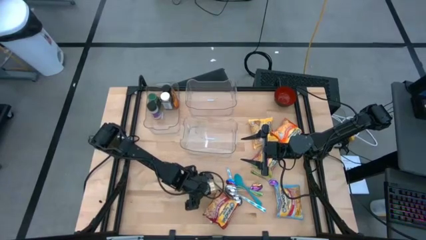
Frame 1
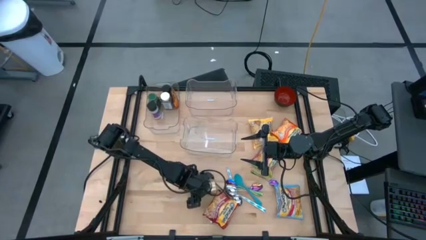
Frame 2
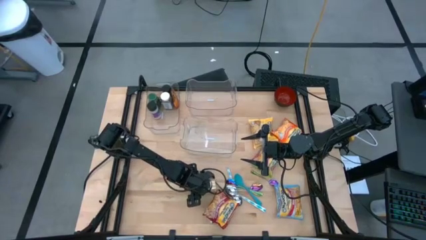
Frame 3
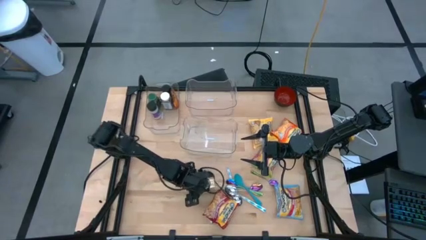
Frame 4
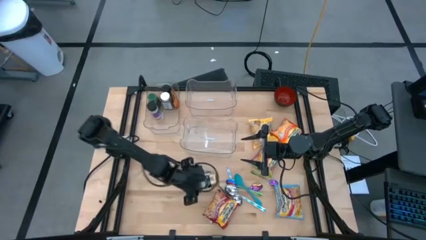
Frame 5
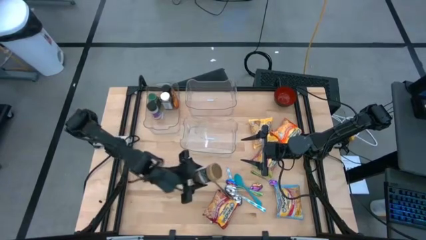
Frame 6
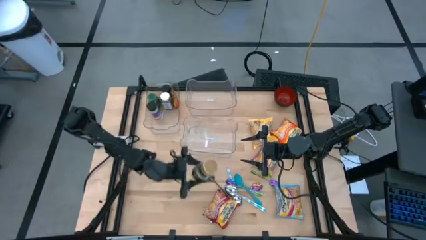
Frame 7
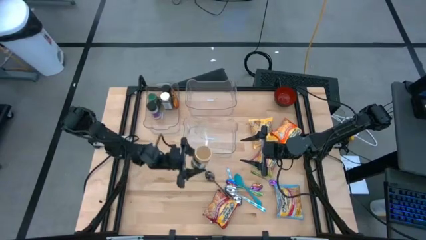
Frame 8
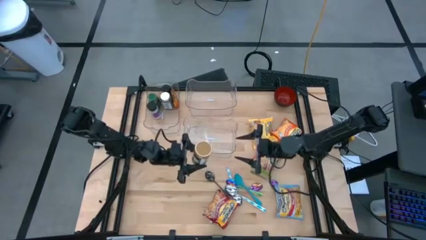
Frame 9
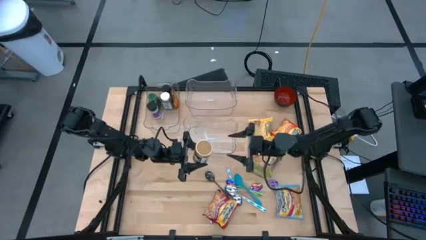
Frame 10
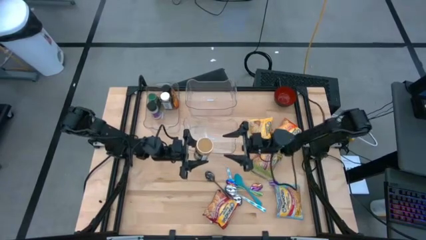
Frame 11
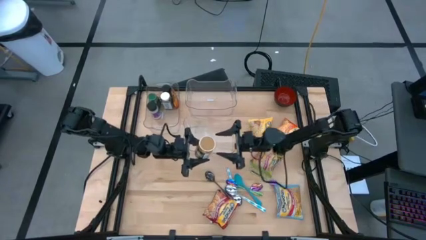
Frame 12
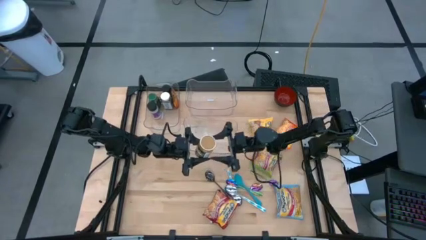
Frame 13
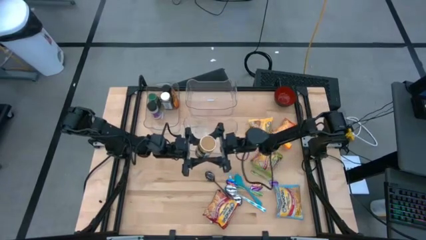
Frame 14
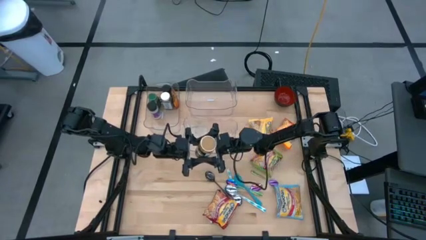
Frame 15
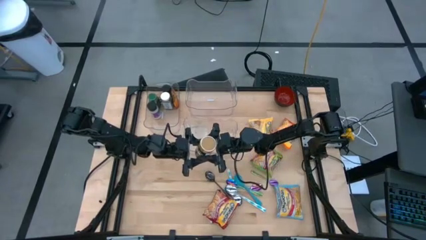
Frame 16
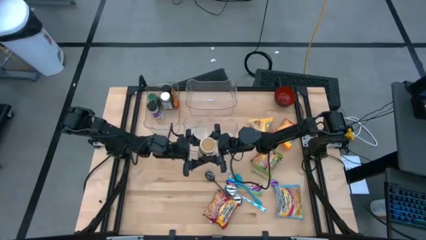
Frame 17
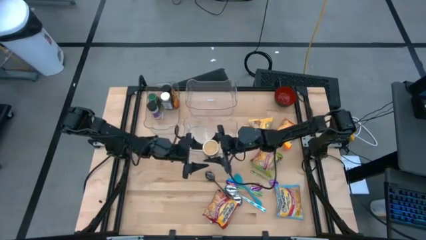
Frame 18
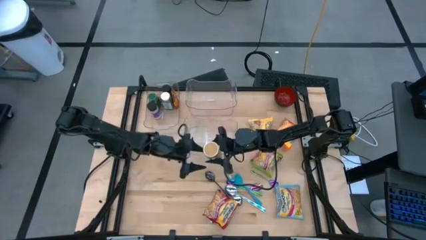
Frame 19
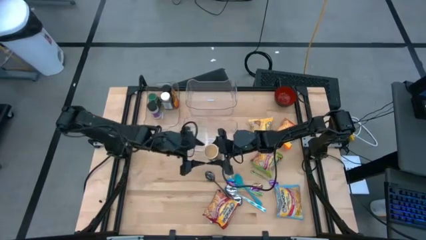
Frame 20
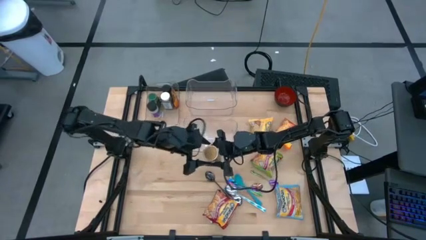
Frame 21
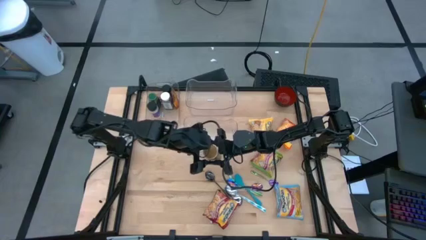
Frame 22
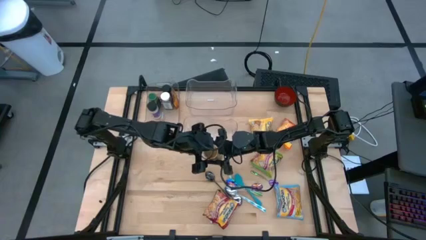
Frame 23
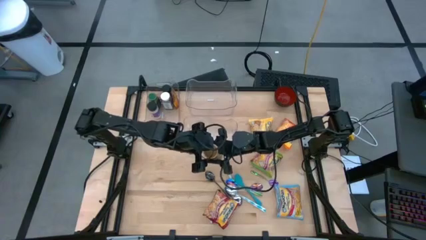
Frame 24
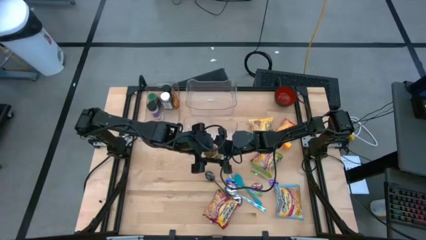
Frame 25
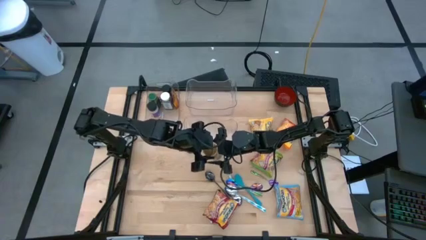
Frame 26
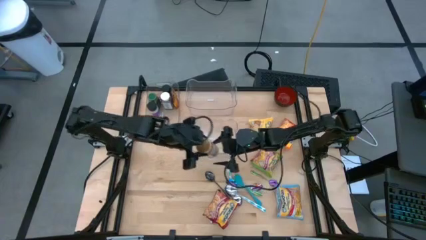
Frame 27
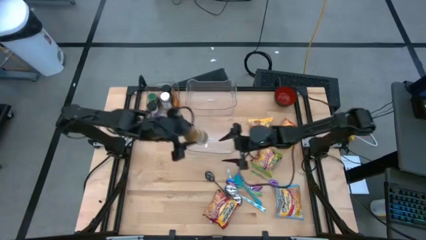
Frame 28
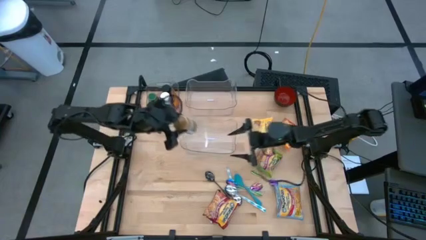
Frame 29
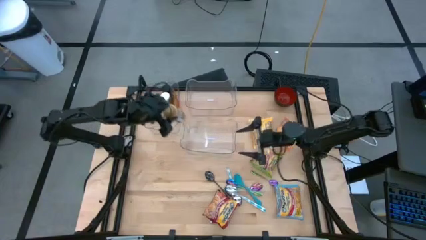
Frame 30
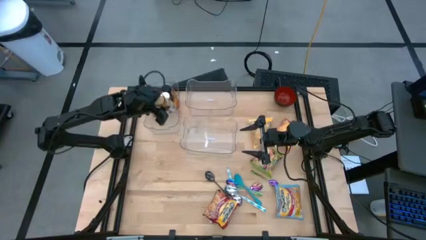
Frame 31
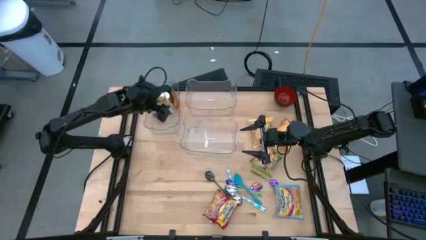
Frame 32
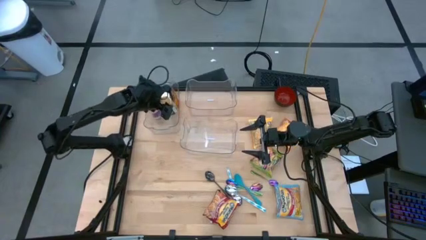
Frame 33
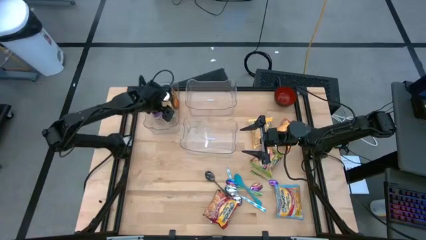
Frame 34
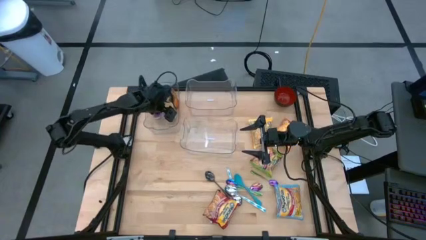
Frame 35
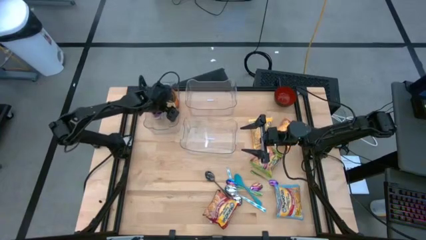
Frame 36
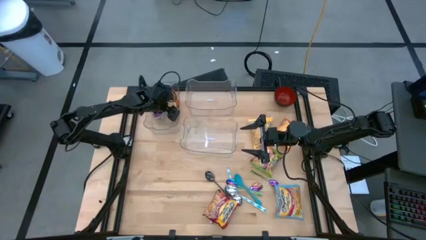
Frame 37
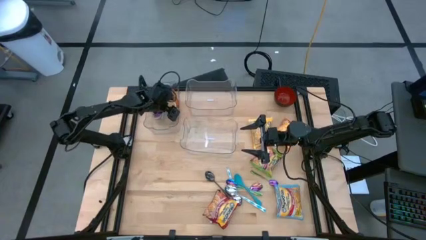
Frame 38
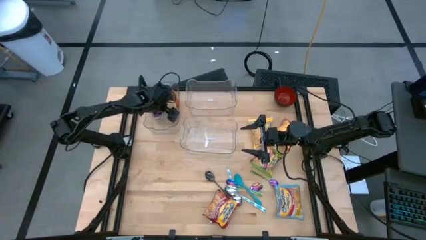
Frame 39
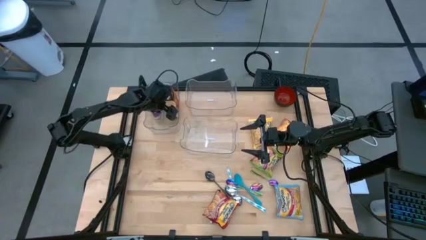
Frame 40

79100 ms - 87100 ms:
Task: Pick & Place Food Item
Put the gold seasoning bottle into the top left transparent bin

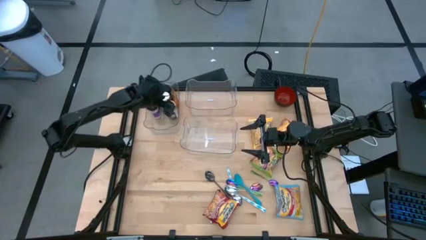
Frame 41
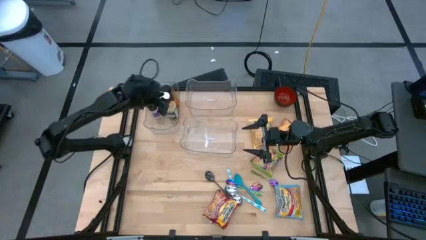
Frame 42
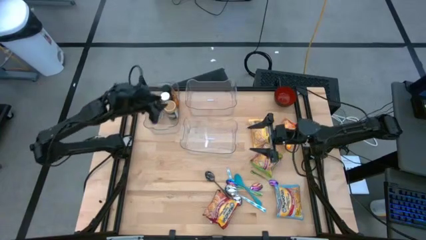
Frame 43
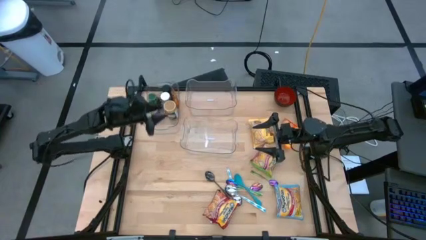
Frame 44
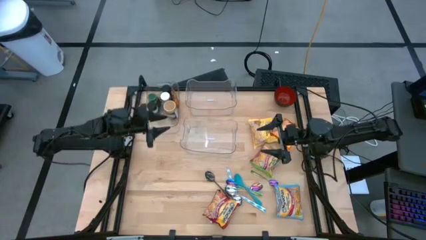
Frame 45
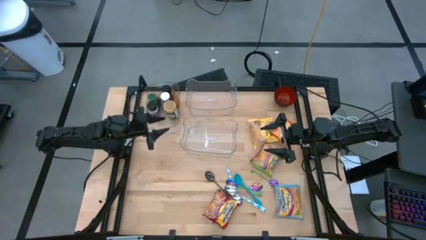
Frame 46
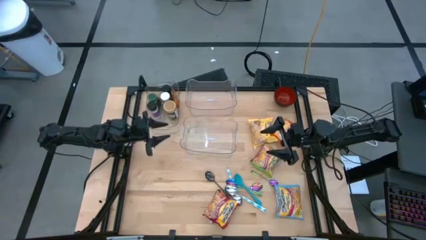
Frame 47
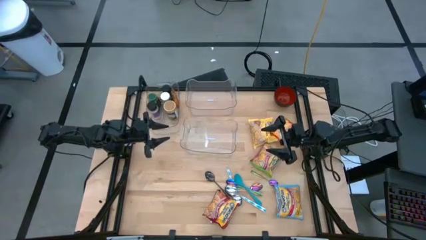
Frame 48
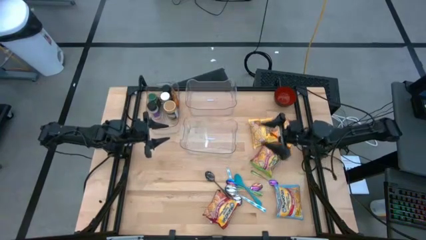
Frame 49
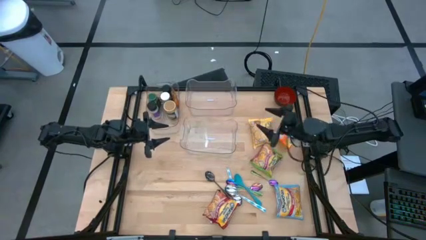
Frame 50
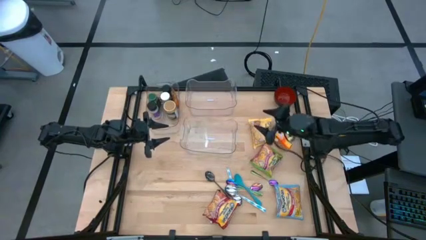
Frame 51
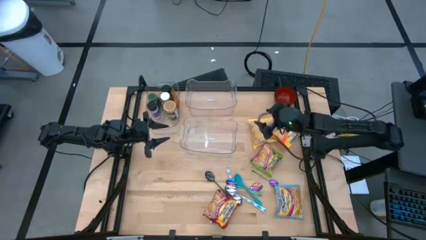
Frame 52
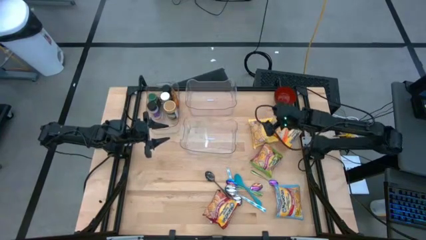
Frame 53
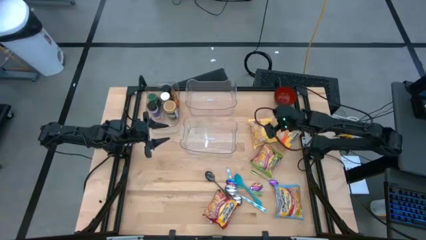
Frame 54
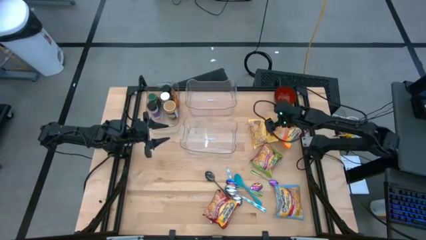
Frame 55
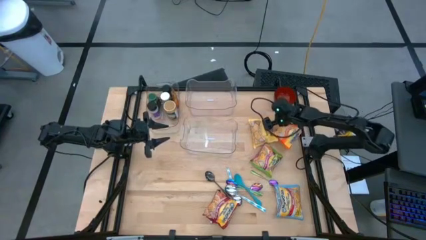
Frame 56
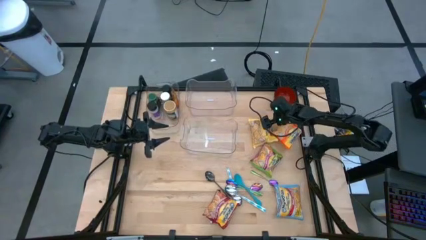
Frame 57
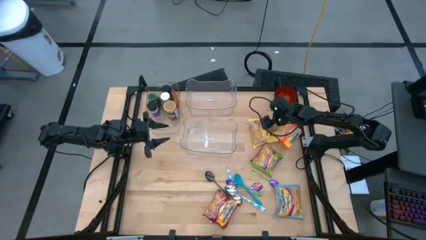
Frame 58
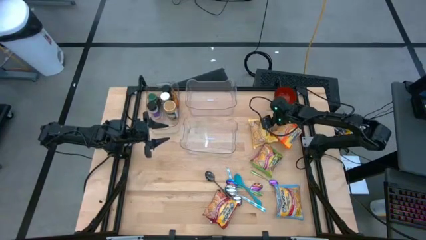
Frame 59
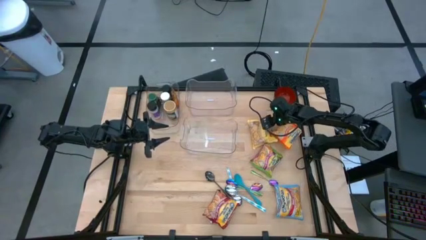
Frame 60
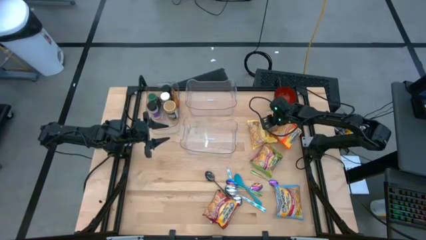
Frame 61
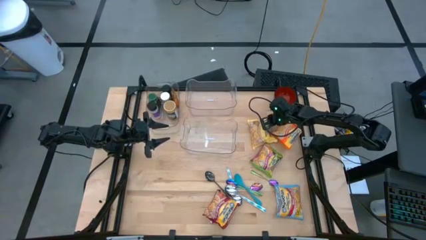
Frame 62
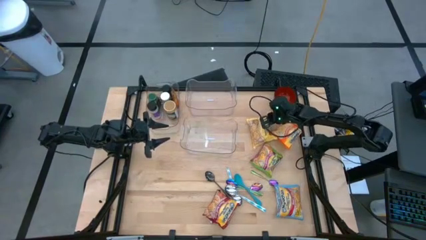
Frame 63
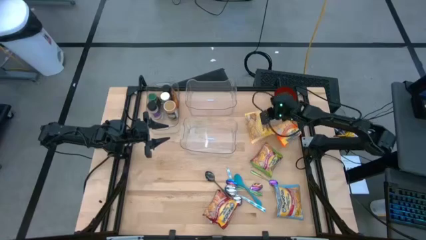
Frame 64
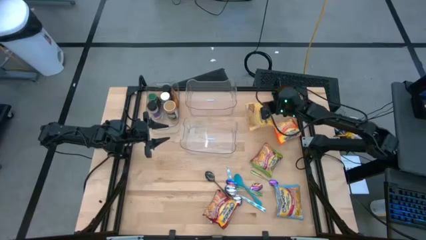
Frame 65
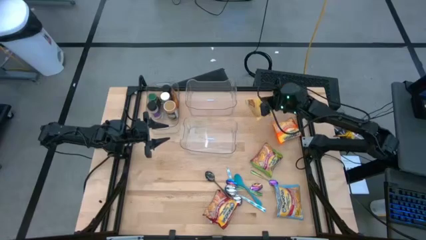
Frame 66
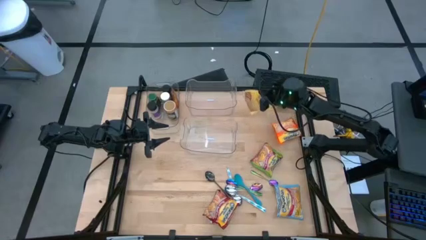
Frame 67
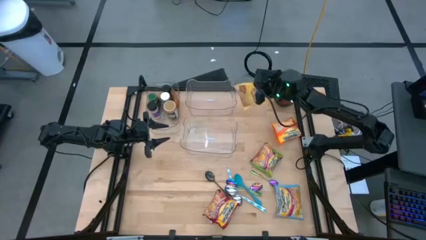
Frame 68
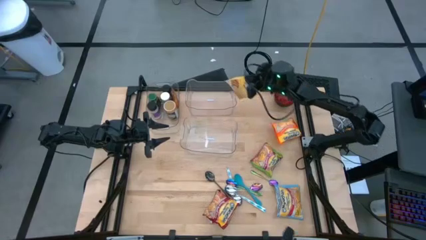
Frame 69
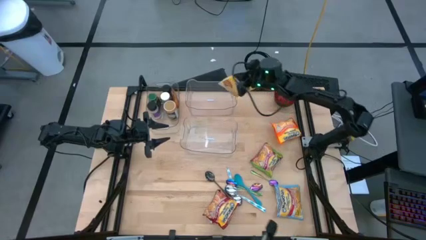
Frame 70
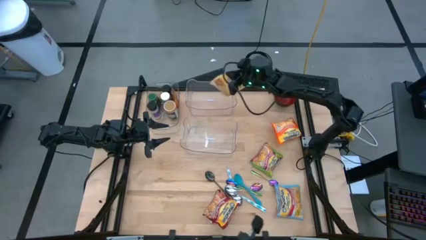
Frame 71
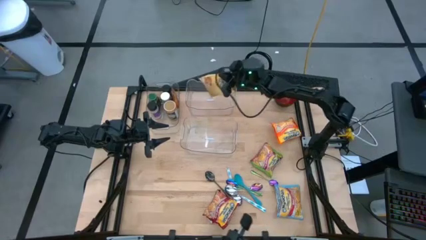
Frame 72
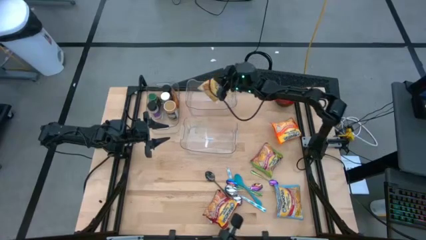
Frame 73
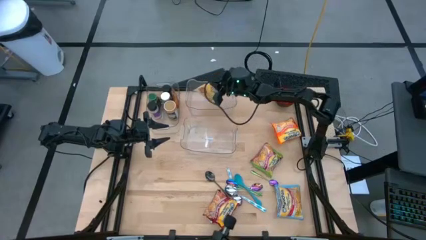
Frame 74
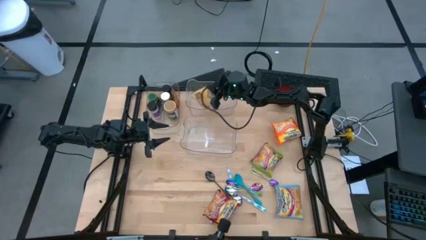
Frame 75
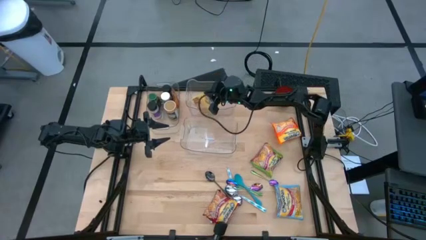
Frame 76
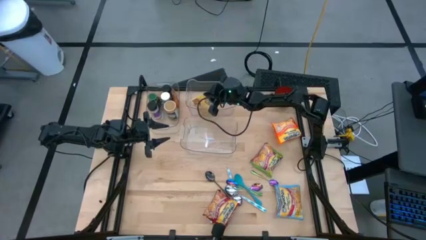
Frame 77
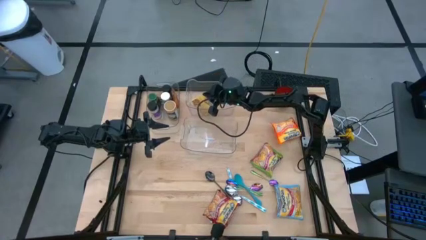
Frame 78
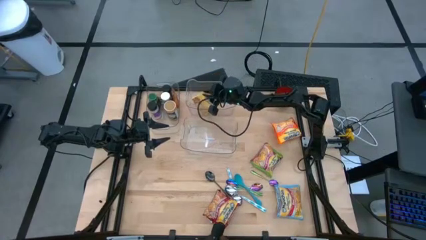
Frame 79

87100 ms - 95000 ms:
Put the yellow noodle pack into the top right transparent bin
